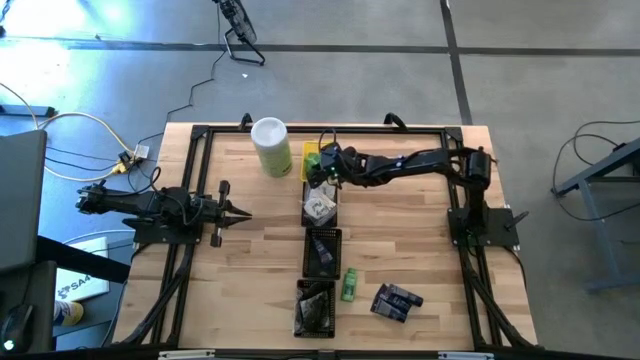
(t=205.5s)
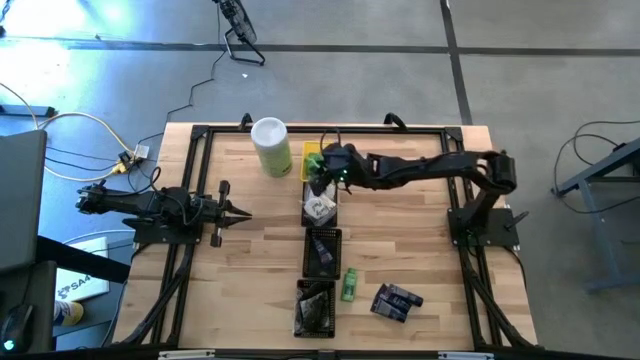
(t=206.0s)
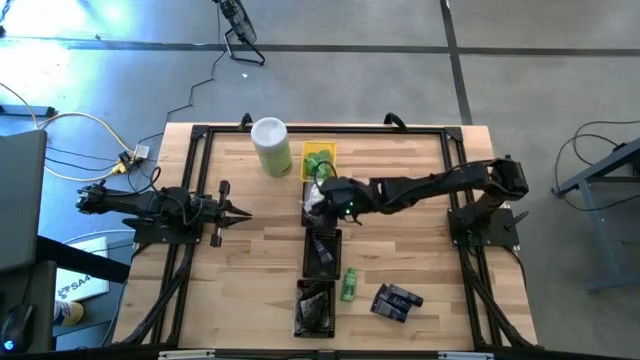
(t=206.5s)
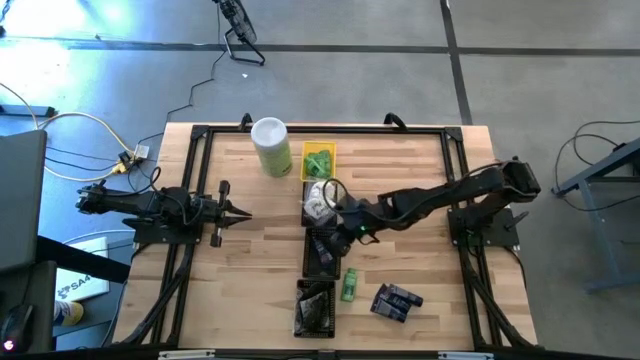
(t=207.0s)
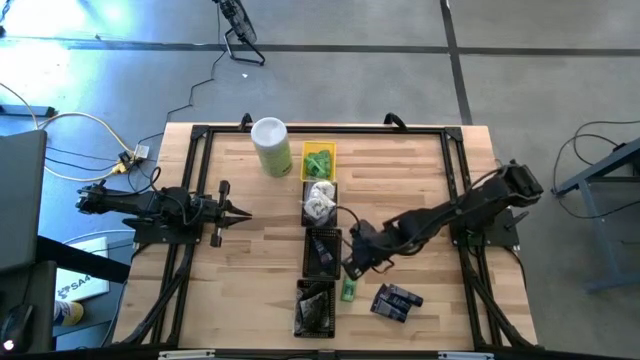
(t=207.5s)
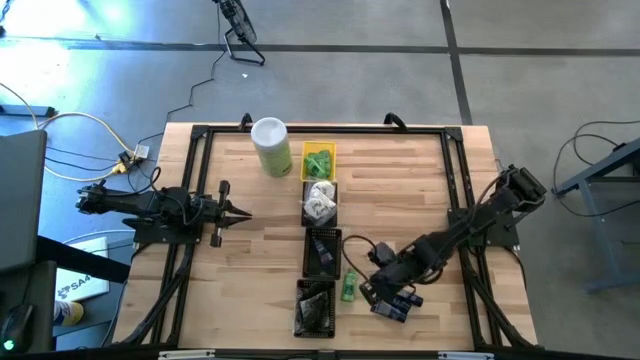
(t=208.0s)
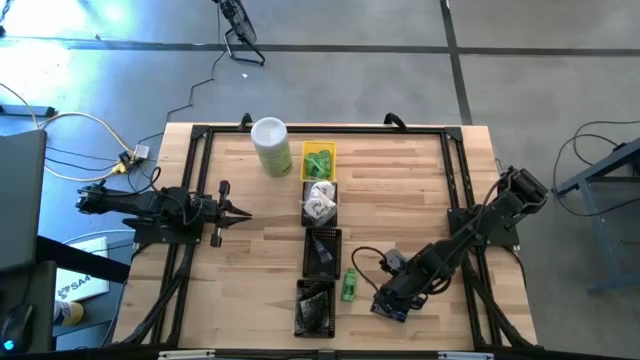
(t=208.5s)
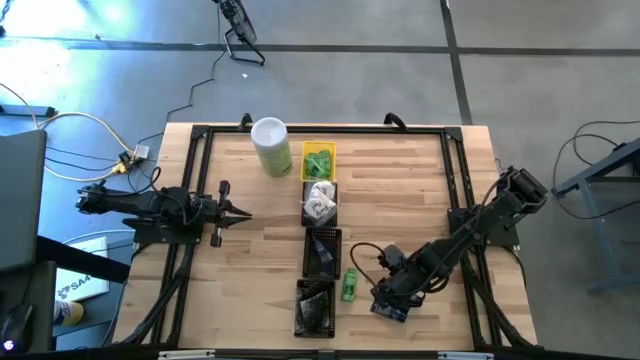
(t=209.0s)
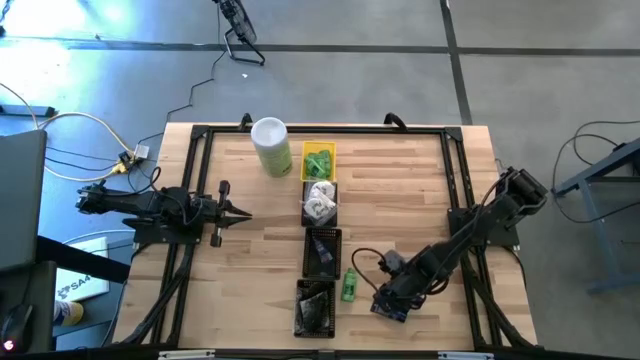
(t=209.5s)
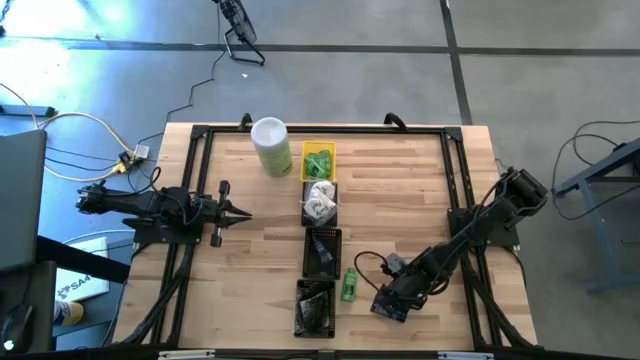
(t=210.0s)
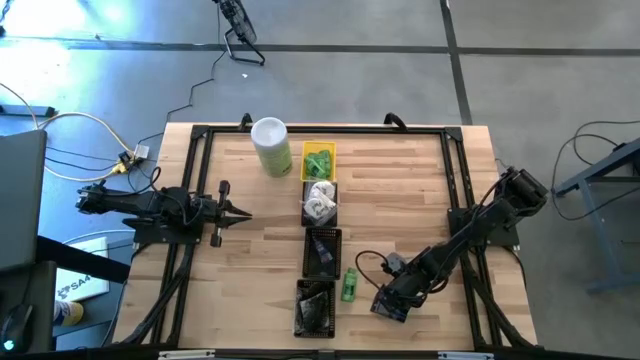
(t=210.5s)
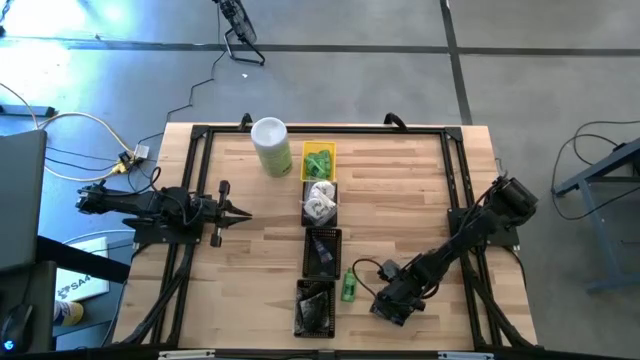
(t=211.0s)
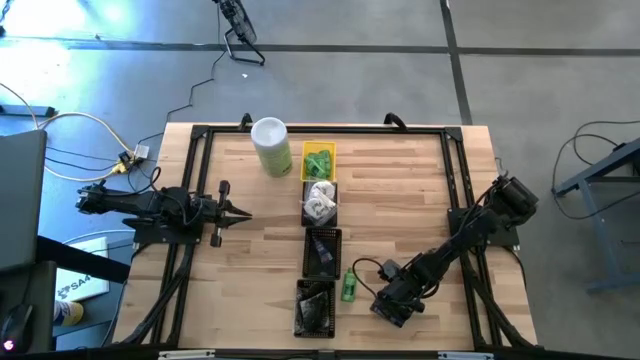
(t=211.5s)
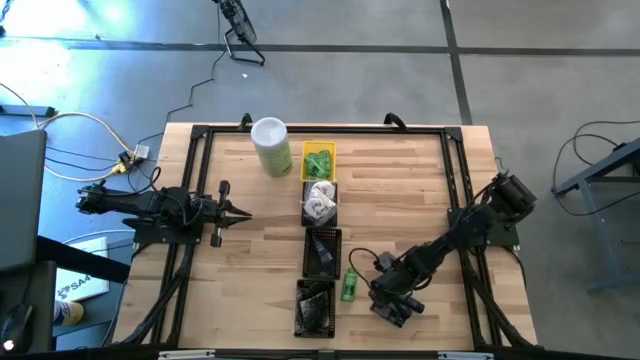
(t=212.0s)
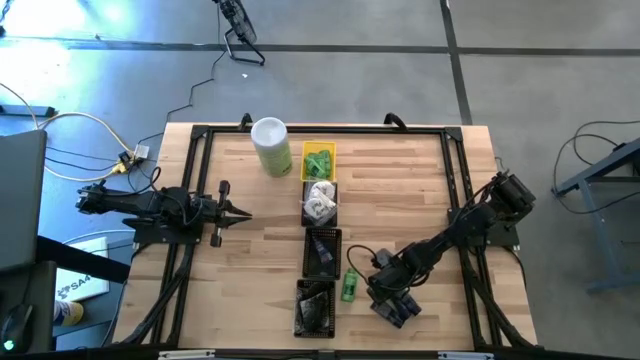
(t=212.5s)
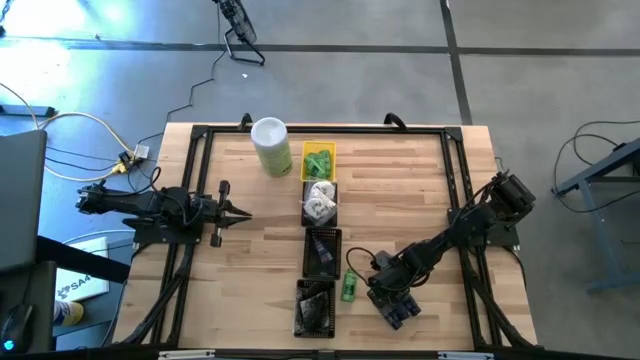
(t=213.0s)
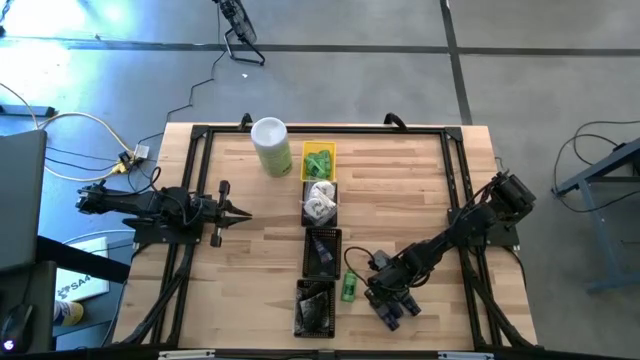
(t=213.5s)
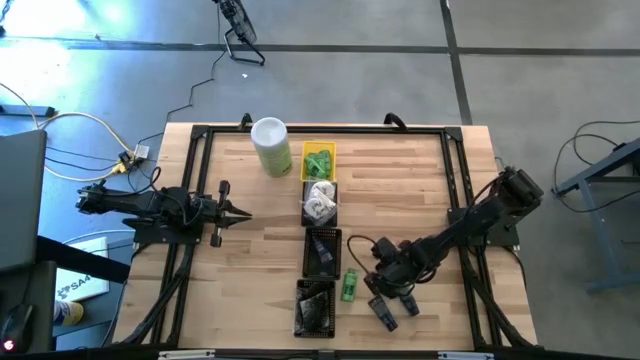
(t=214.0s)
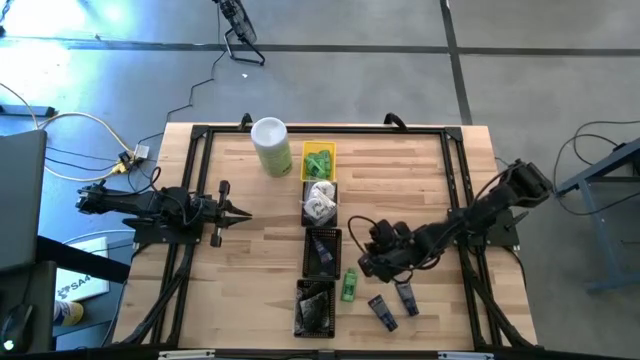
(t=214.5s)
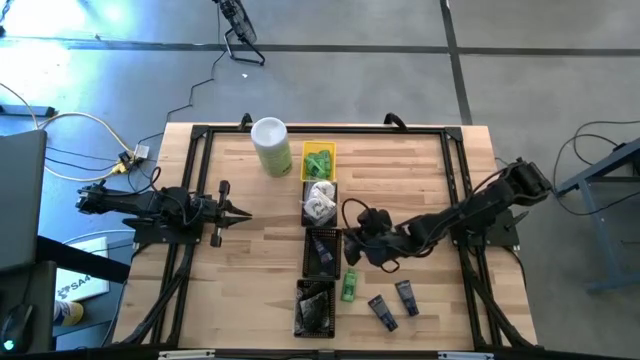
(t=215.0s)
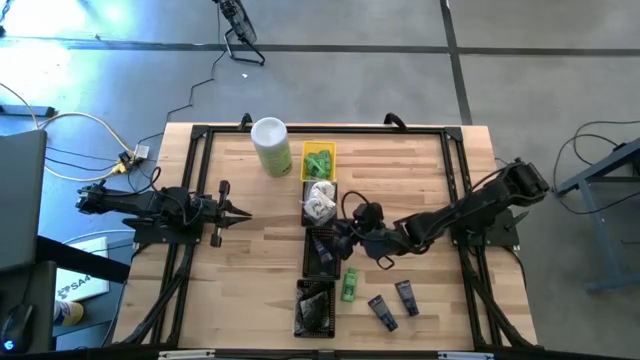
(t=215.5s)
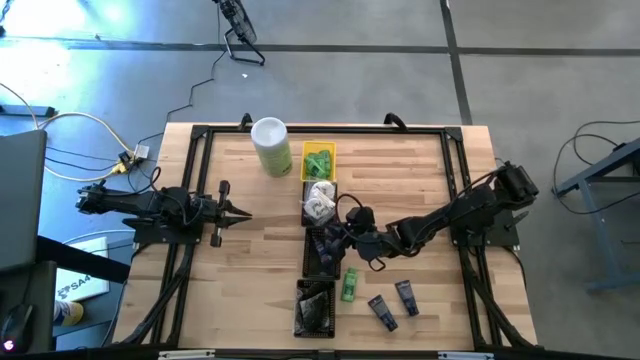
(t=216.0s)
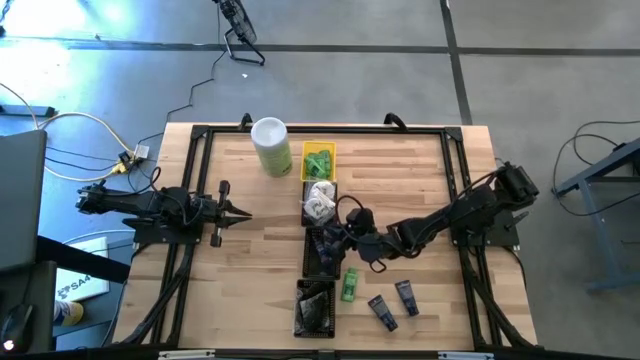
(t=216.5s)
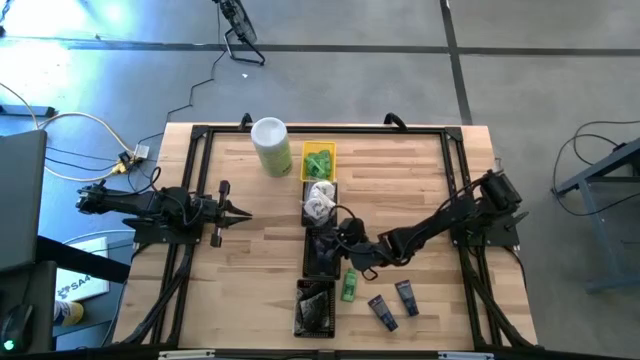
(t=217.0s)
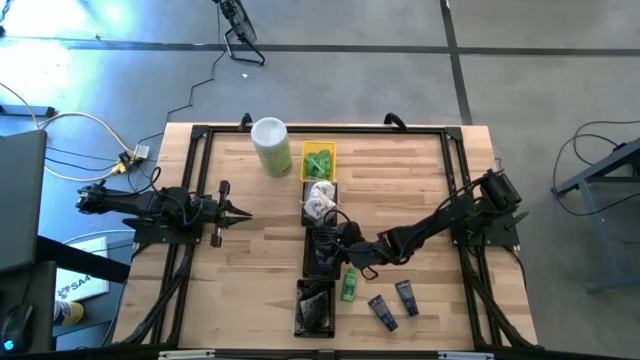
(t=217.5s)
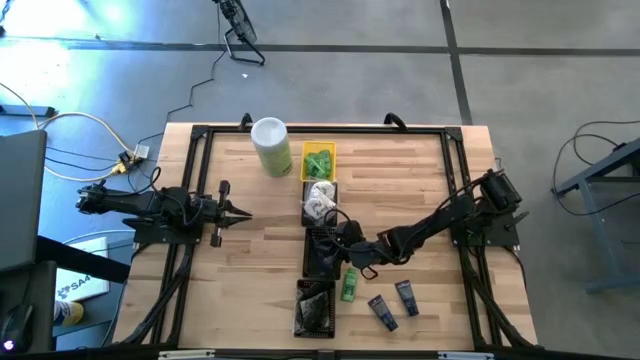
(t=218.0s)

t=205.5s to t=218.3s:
Task: Pick & Place Travel size toiletries
Put the dark blue bottle into the middle black basket

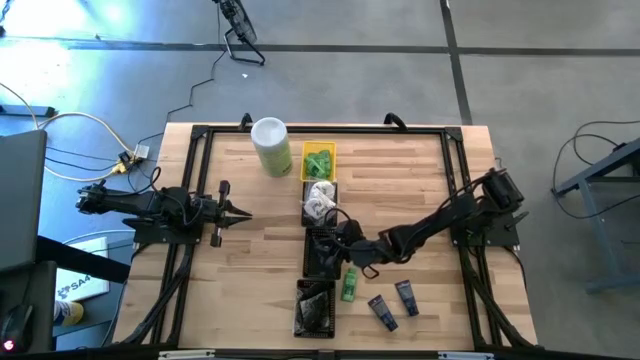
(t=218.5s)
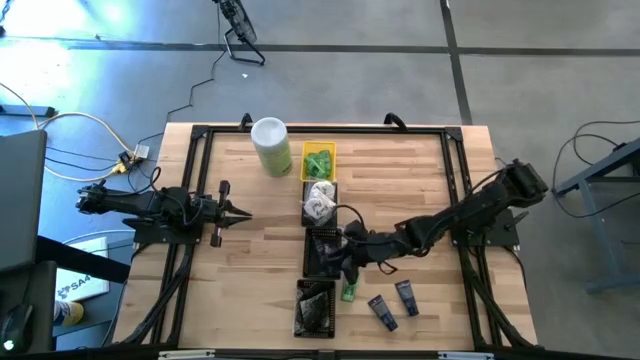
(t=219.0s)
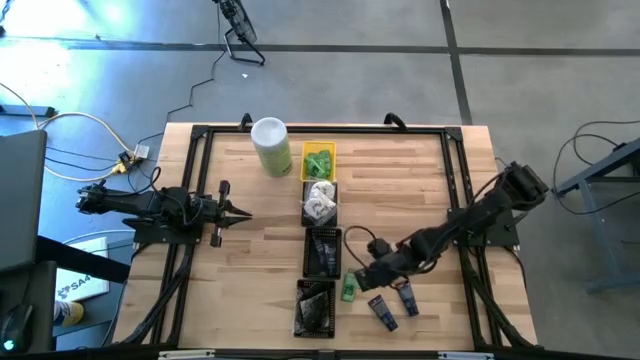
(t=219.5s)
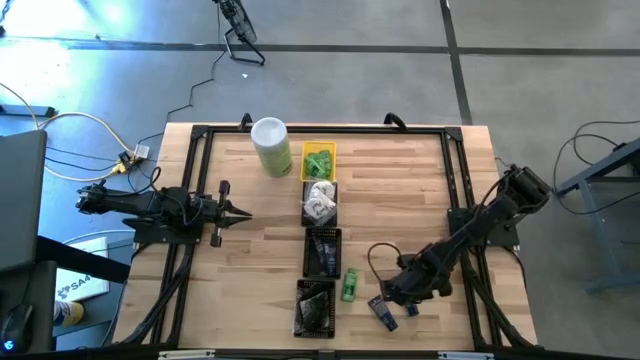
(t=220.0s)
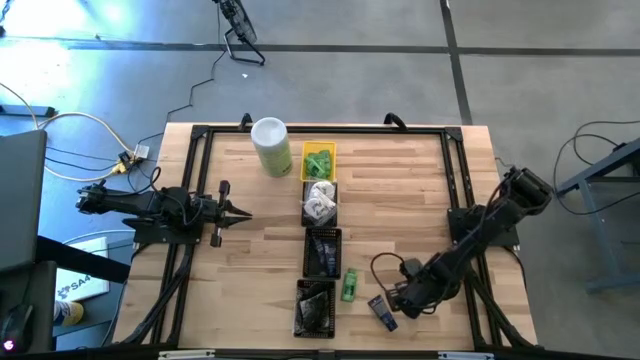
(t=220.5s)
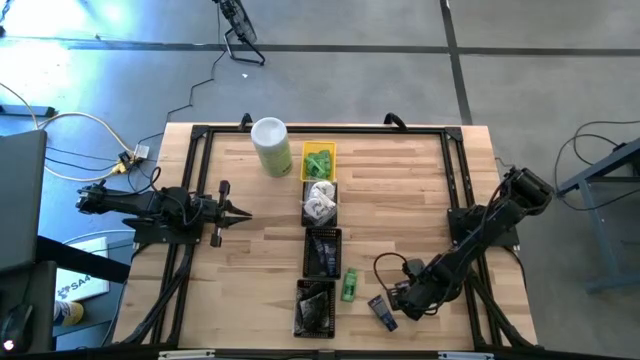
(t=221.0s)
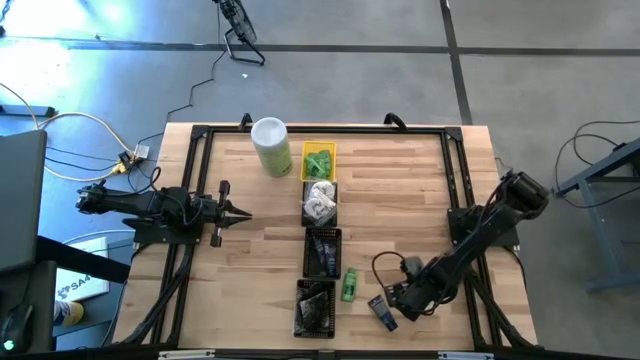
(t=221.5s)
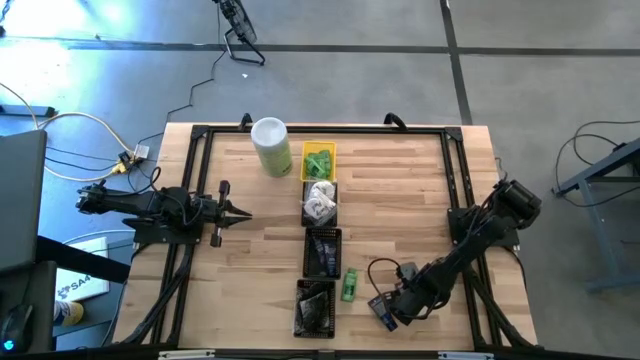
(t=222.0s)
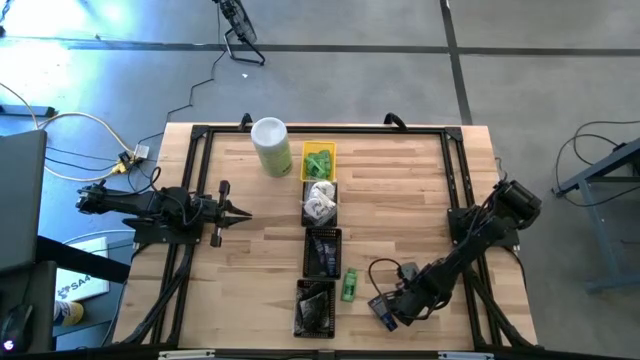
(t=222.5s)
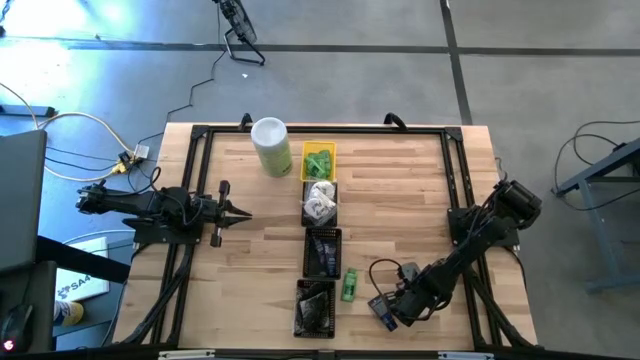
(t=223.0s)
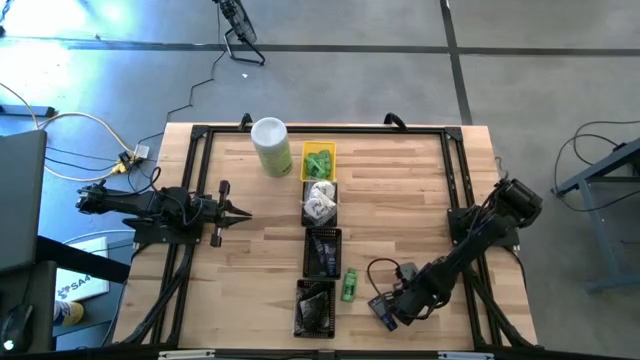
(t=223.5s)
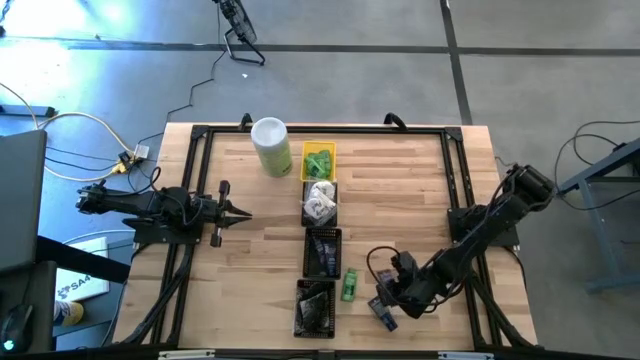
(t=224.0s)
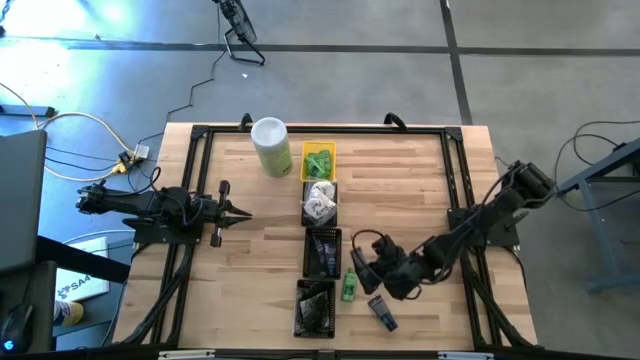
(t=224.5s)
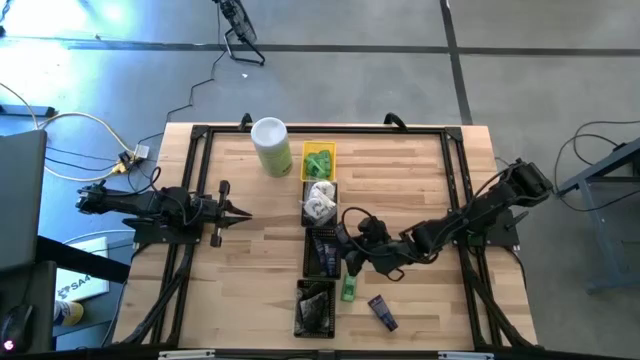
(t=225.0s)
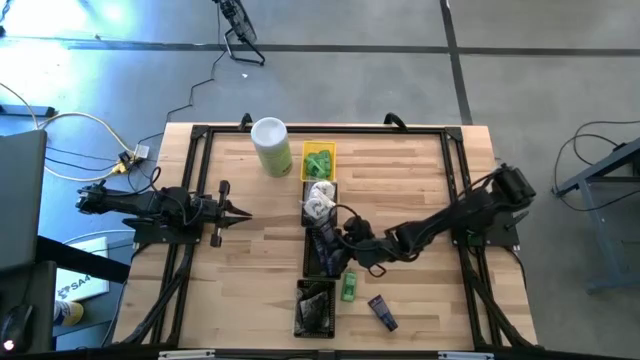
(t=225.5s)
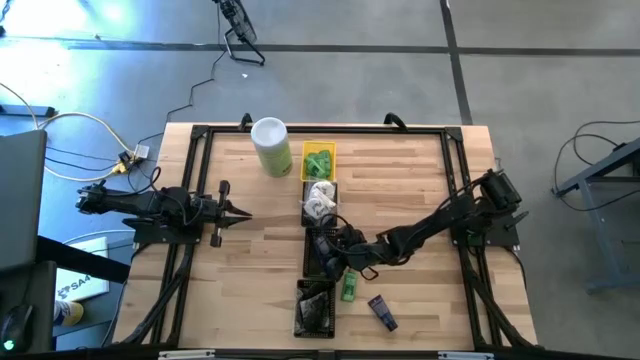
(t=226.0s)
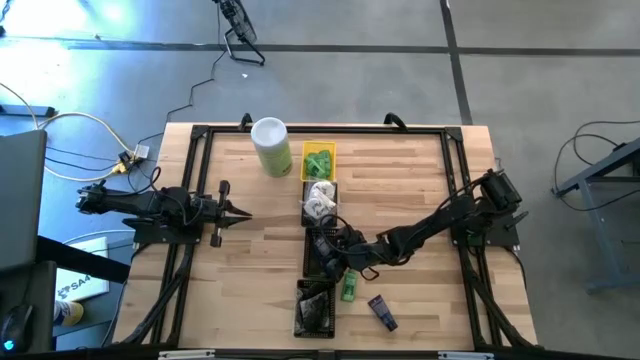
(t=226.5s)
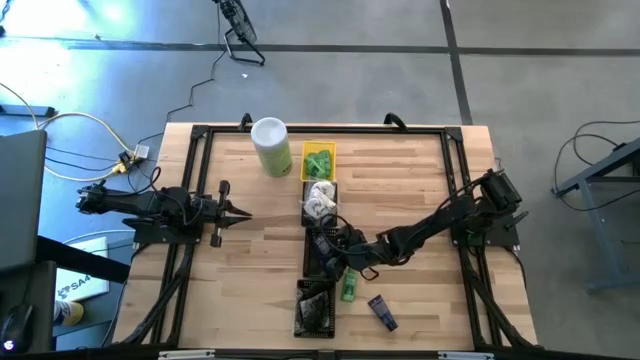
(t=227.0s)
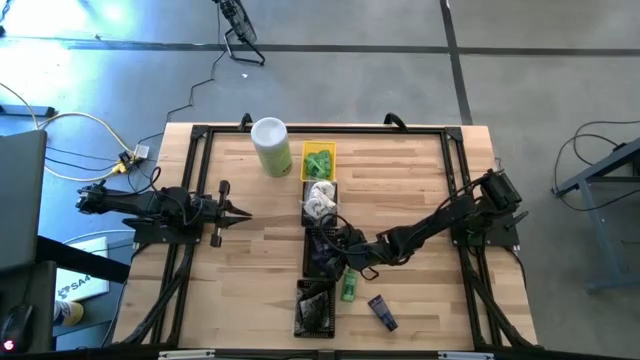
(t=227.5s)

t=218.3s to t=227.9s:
Put the dark blue bottle into the middle black basket
